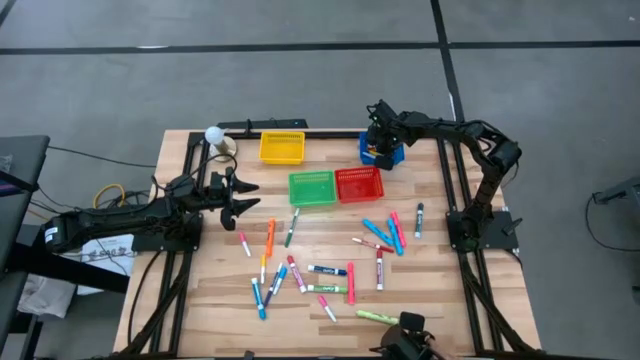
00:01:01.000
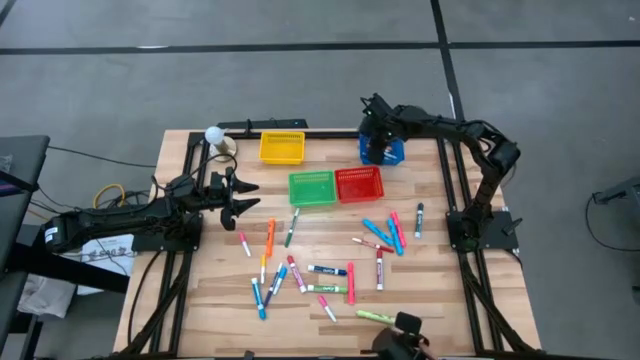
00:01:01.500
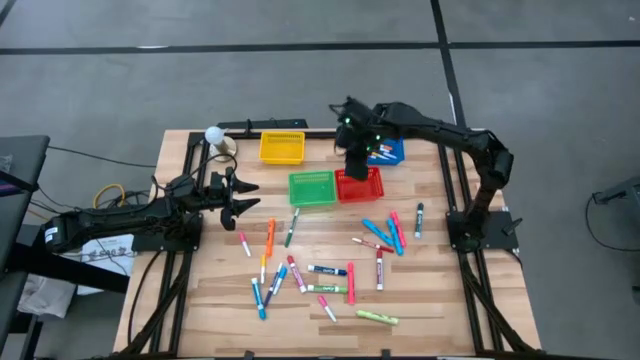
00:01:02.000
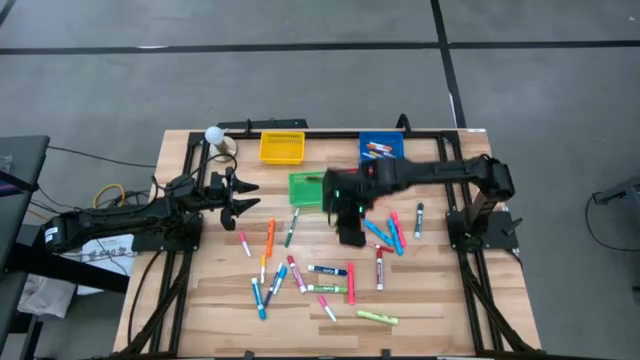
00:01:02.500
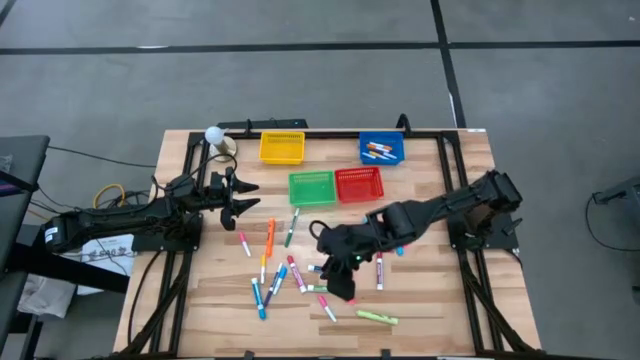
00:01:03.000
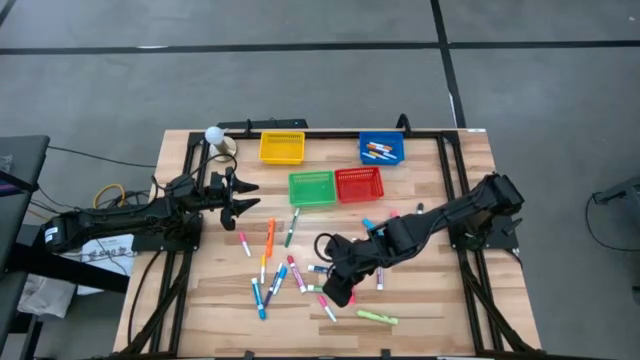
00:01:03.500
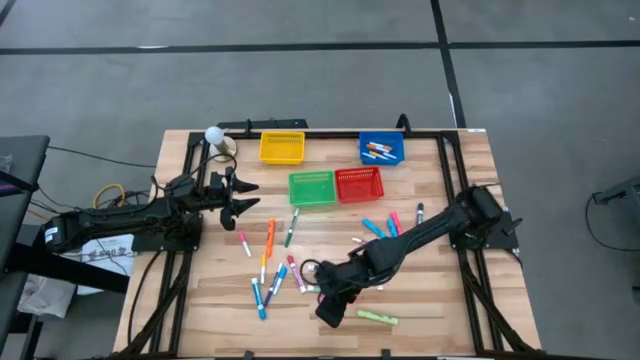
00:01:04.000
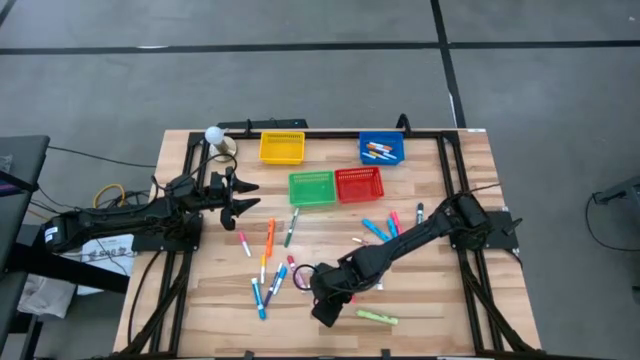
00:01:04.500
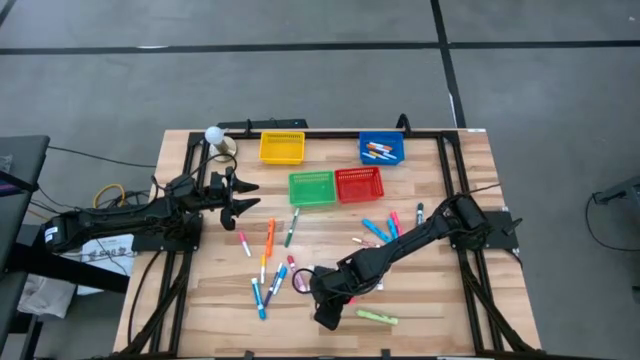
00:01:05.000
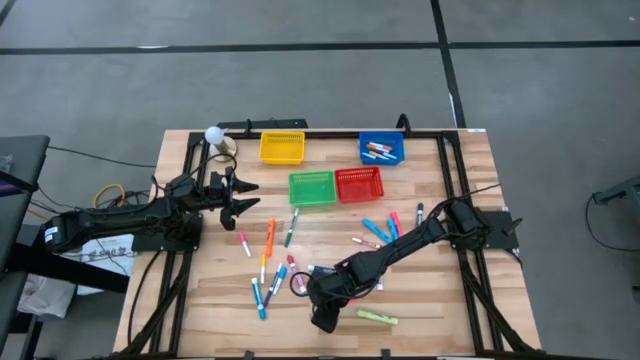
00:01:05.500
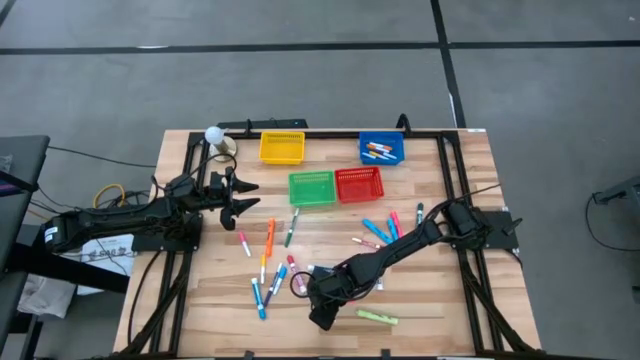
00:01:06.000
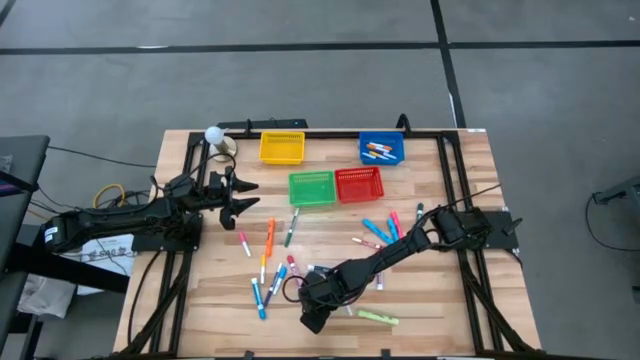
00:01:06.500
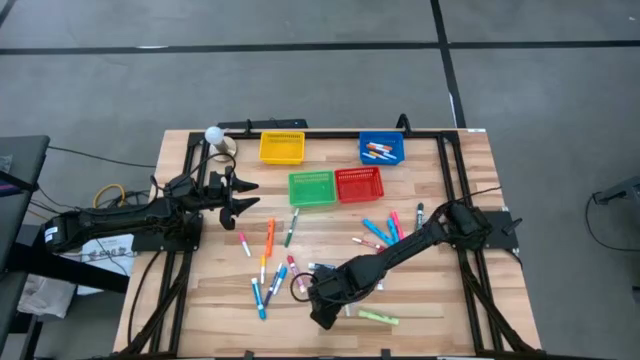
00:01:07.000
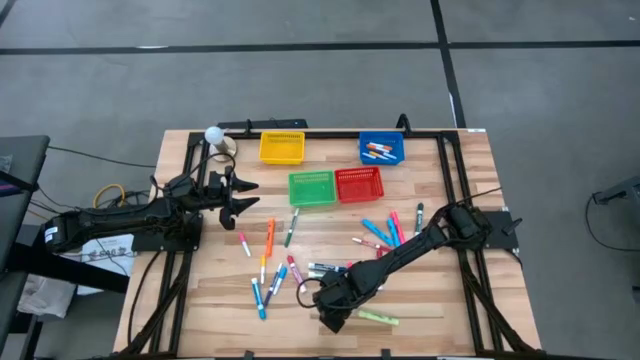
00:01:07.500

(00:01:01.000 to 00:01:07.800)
Task: Pick & Place Markers
Put the right small pink highlighter pen into the blue bin

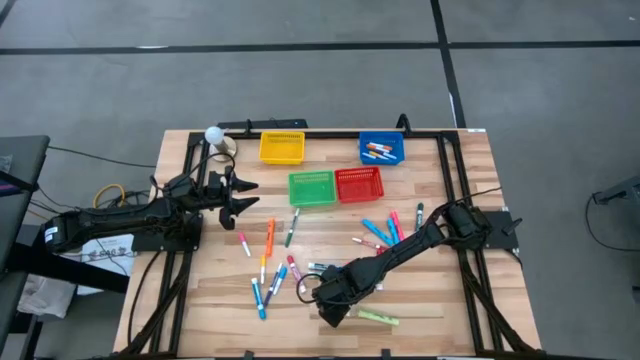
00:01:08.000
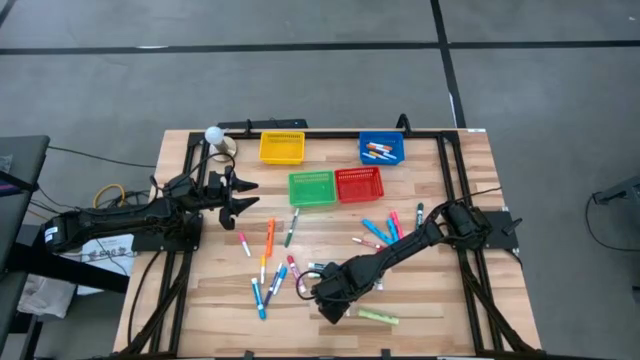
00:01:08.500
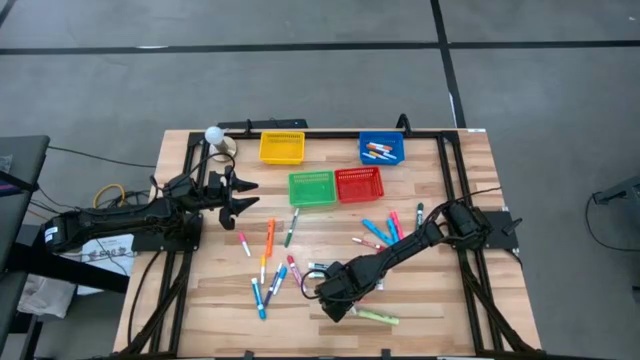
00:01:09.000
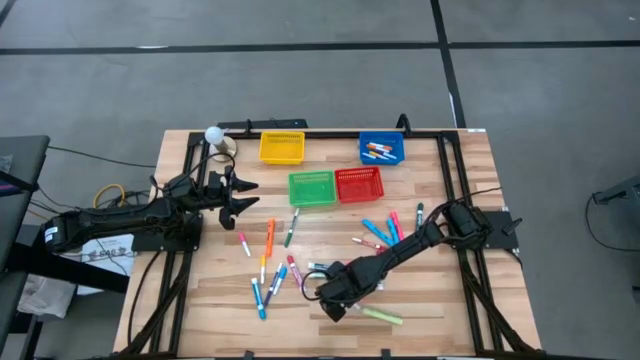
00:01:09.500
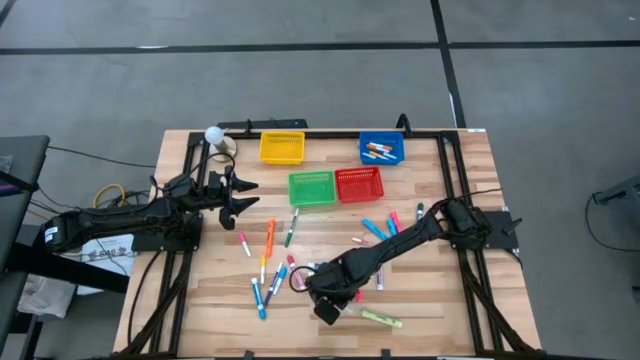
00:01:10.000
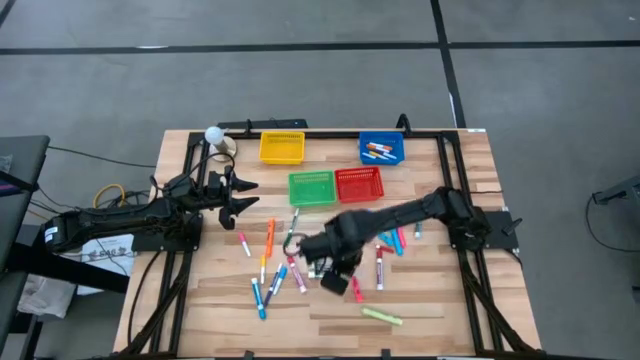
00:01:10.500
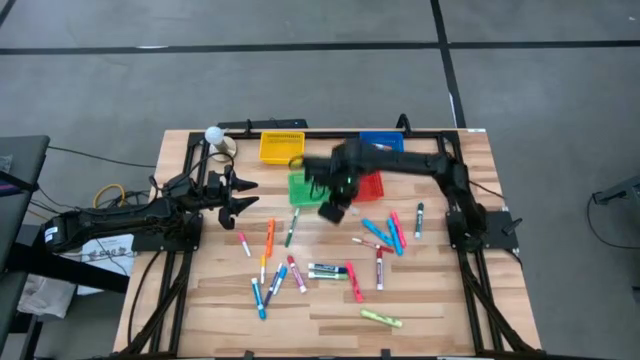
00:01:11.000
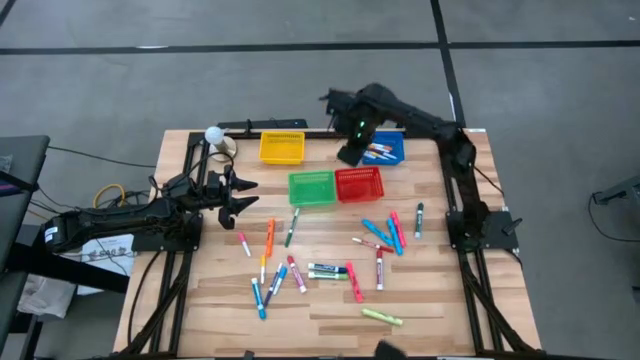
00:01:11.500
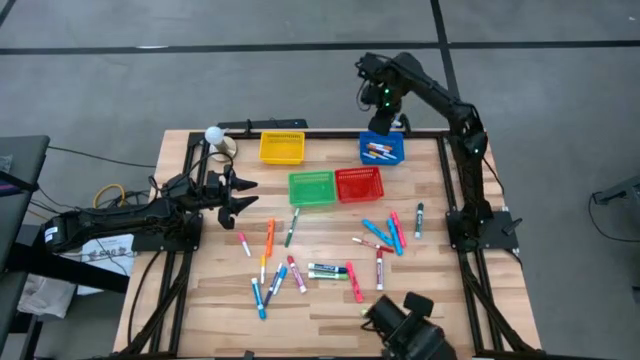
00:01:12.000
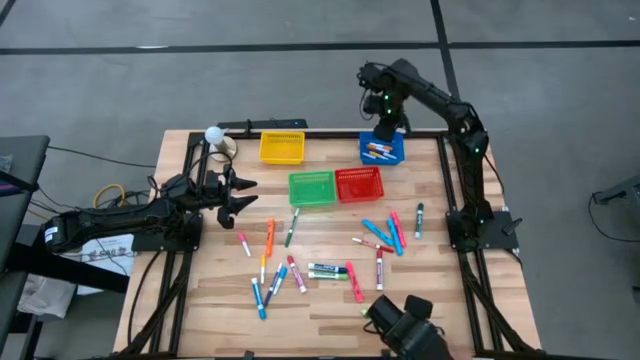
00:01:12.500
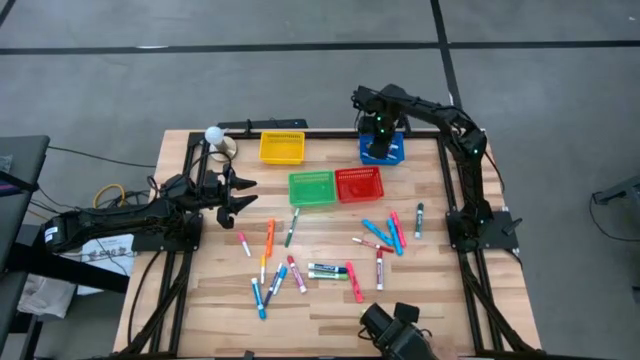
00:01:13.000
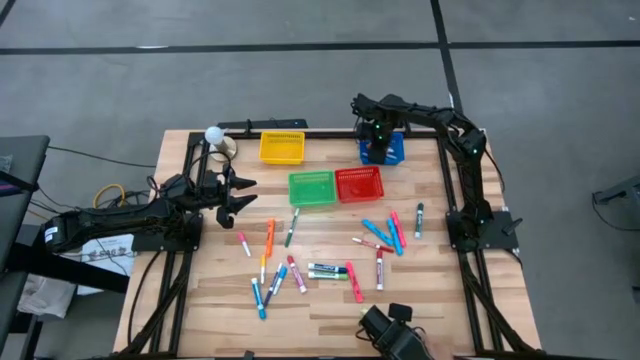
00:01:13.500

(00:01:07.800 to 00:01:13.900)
Put the right small pink highlighter pen into the blue bin

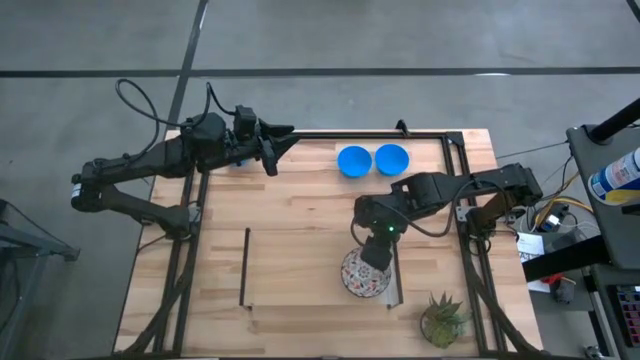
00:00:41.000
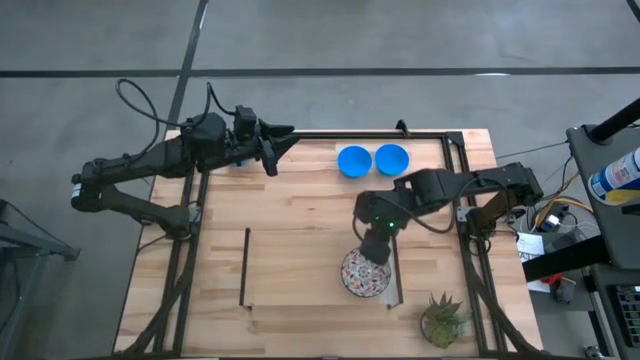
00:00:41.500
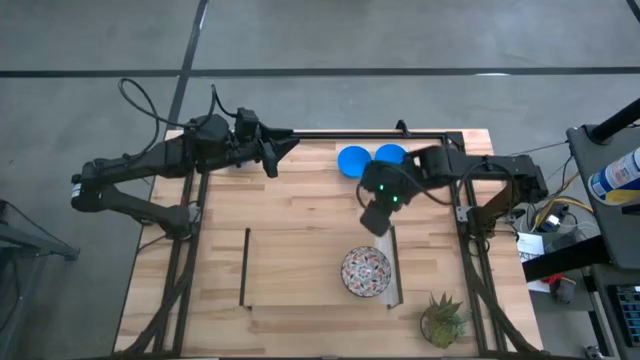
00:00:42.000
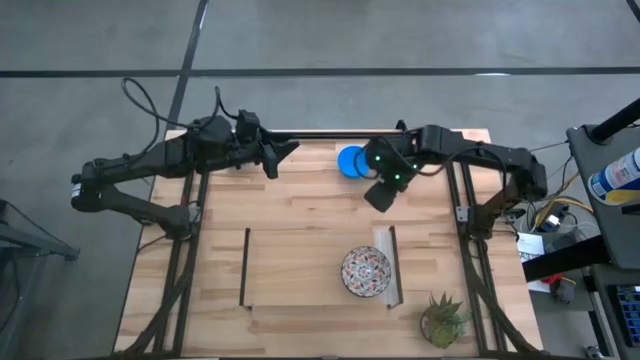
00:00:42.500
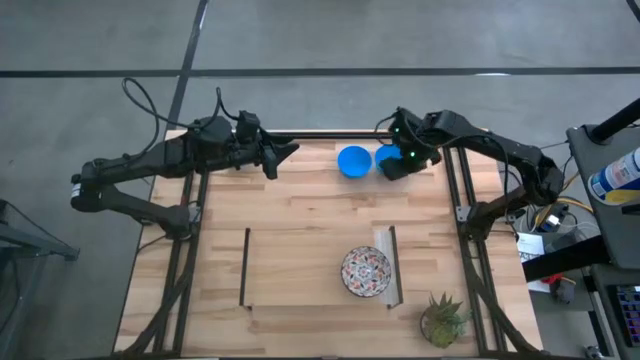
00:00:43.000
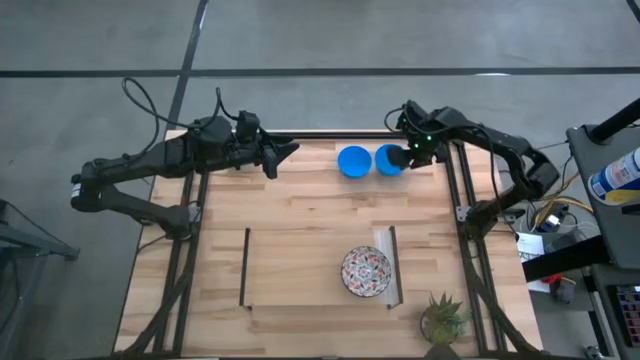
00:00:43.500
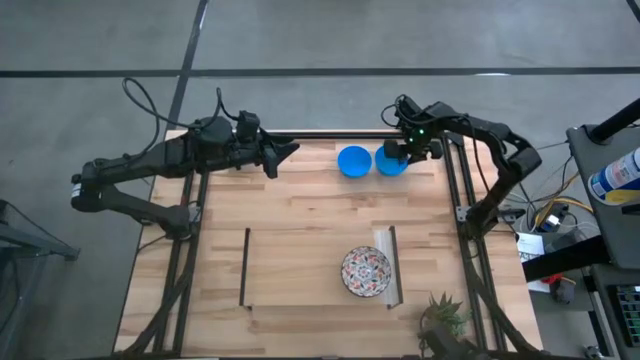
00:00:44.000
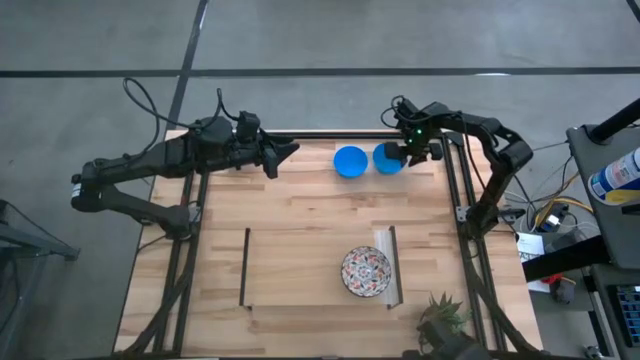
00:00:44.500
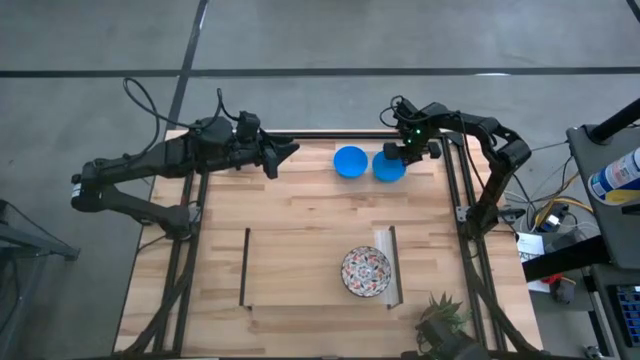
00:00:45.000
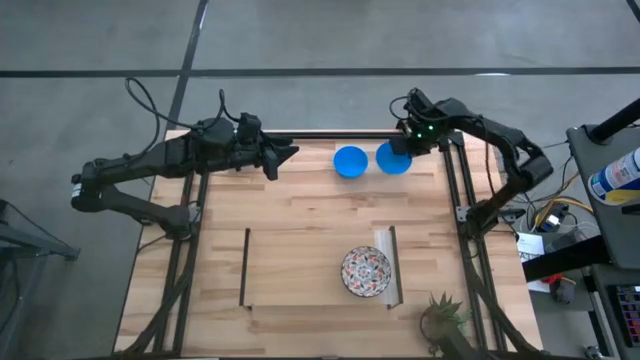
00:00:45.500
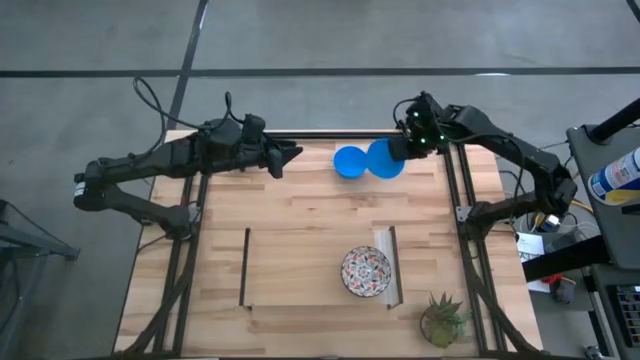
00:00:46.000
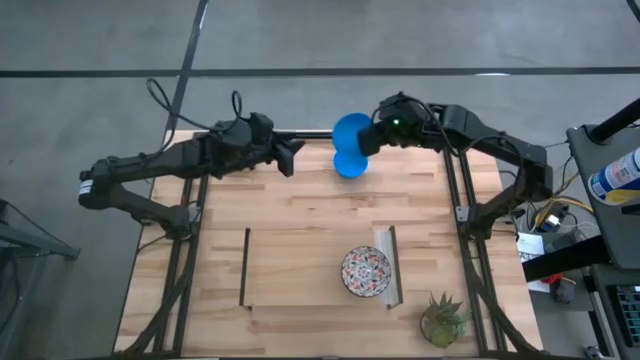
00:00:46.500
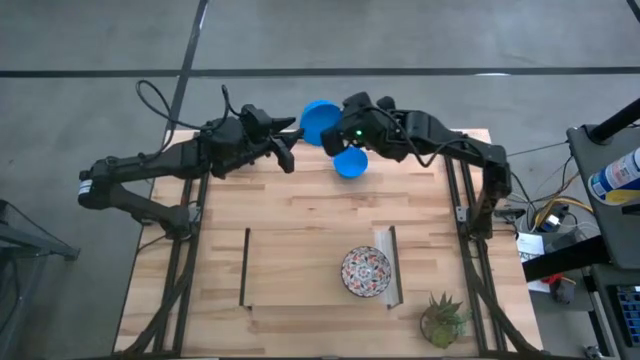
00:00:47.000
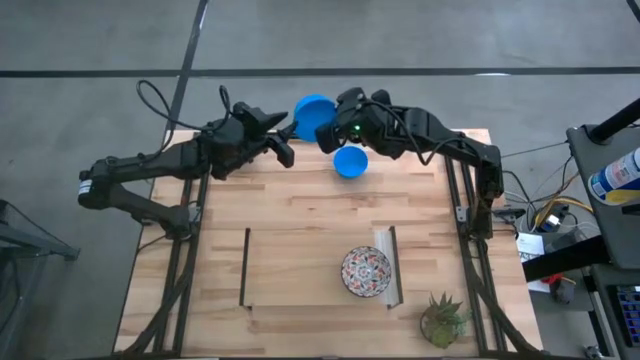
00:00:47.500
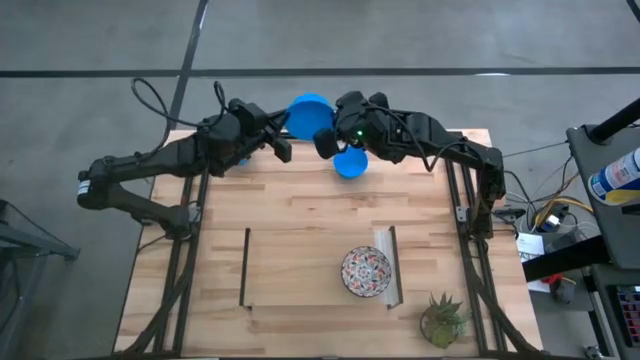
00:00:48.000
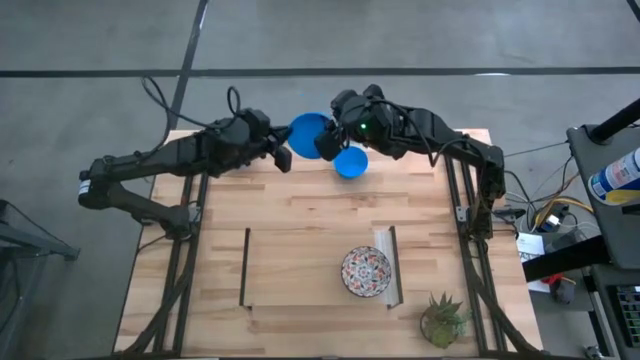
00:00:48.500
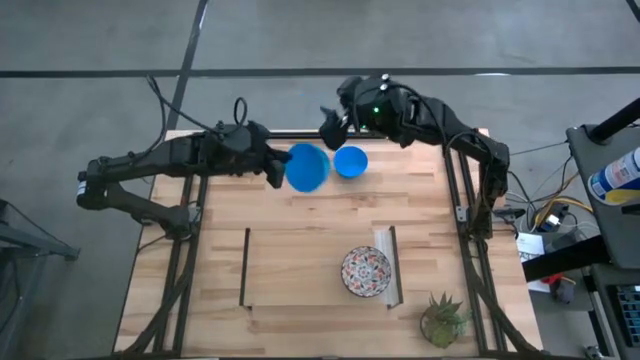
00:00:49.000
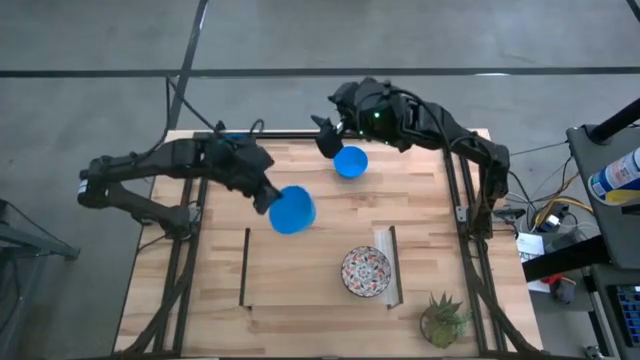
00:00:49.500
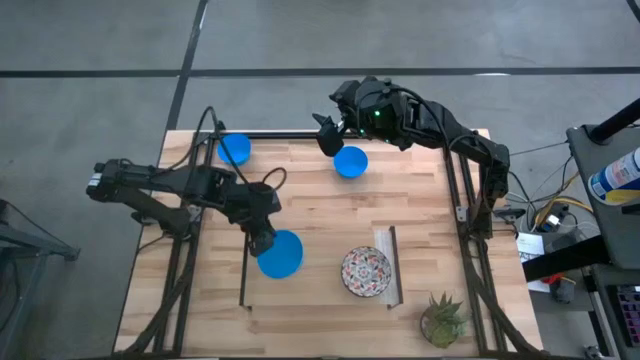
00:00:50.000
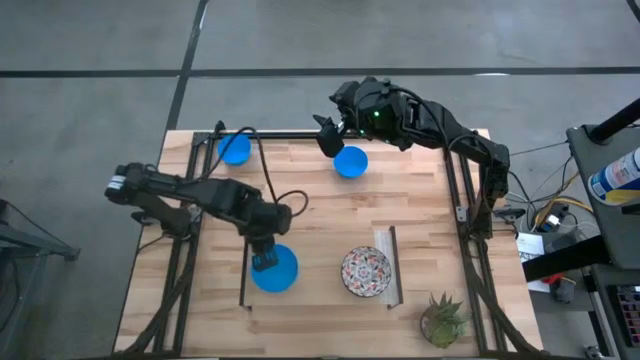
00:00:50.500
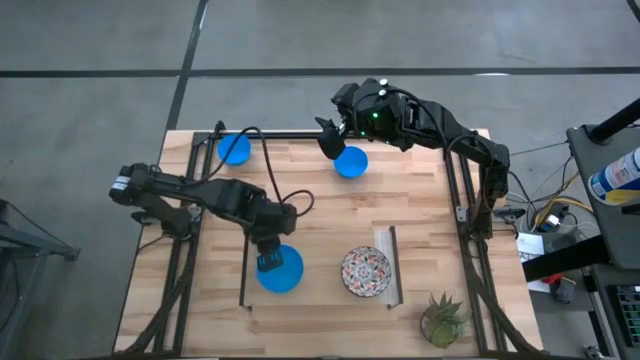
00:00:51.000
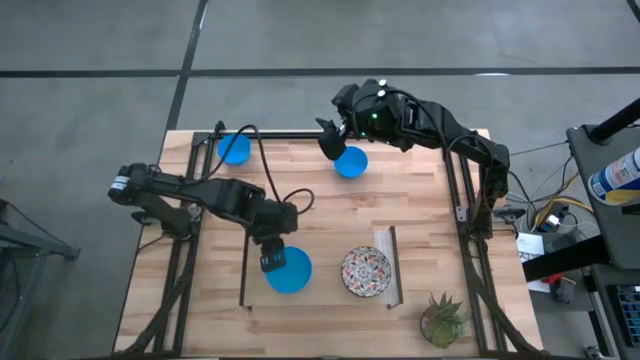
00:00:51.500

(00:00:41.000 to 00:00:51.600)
Task: Pick & Place Mini bowls
Put the right blue bowl on the shelf
